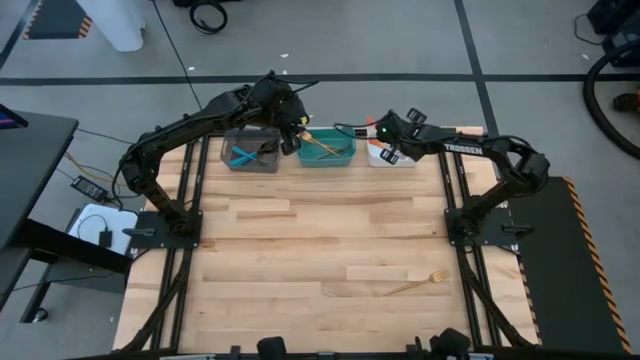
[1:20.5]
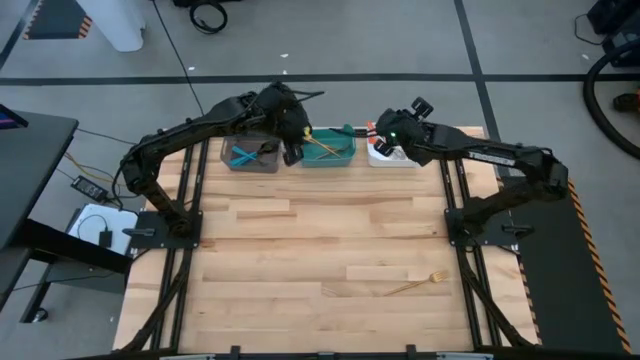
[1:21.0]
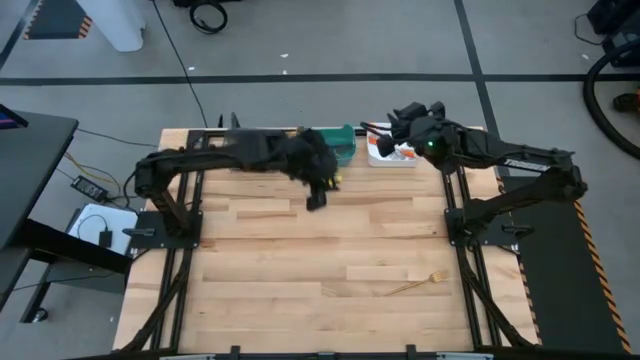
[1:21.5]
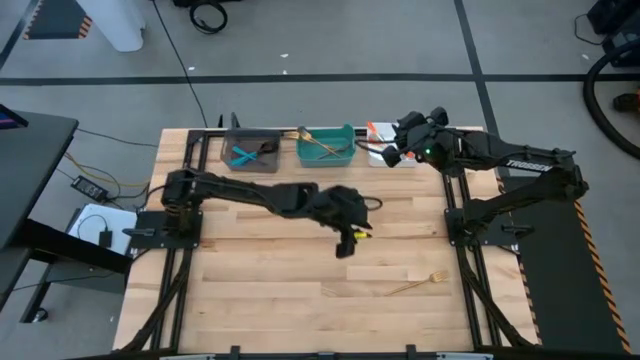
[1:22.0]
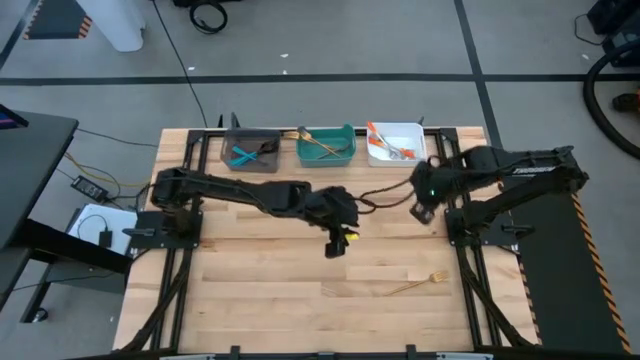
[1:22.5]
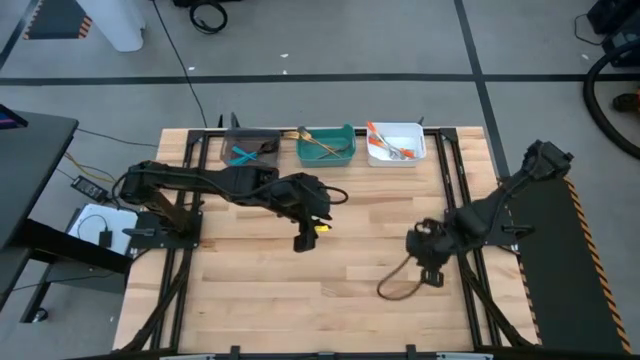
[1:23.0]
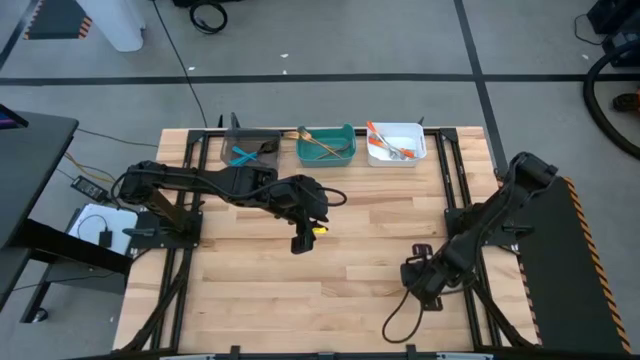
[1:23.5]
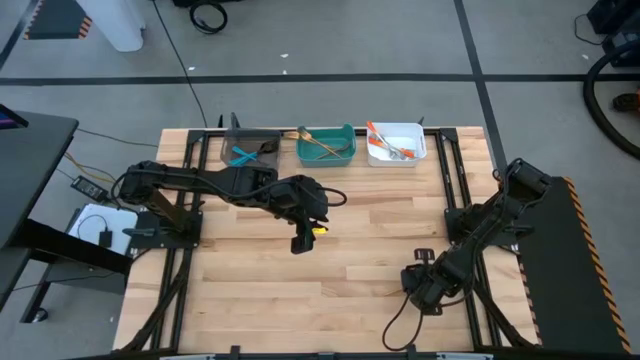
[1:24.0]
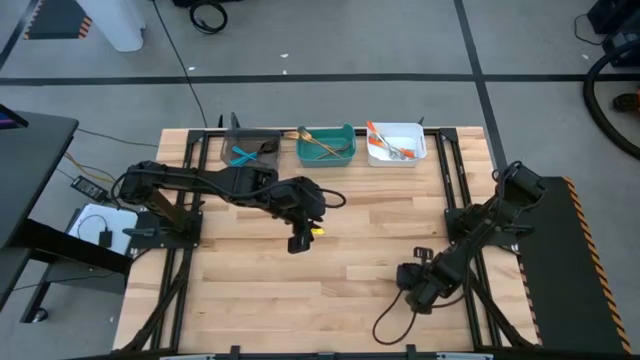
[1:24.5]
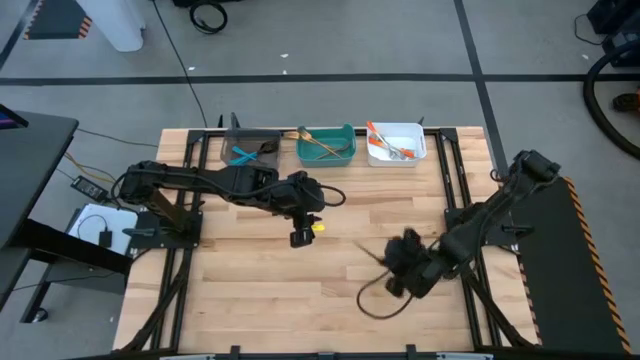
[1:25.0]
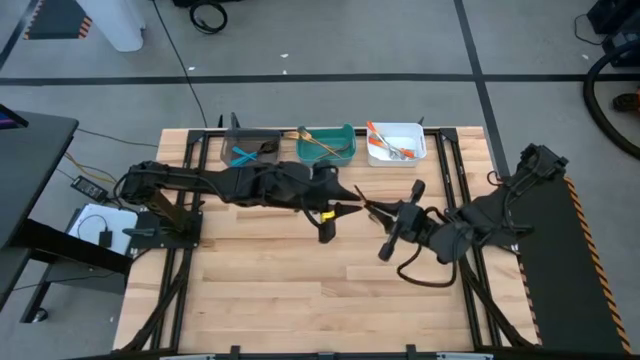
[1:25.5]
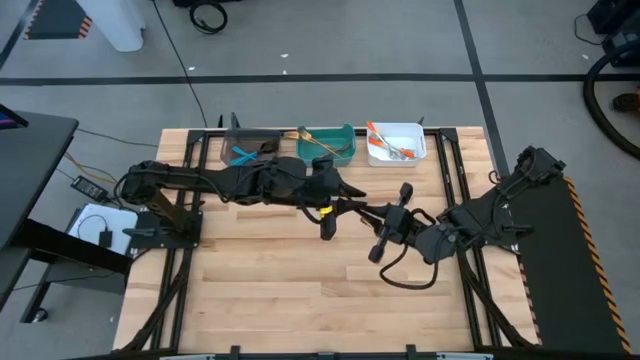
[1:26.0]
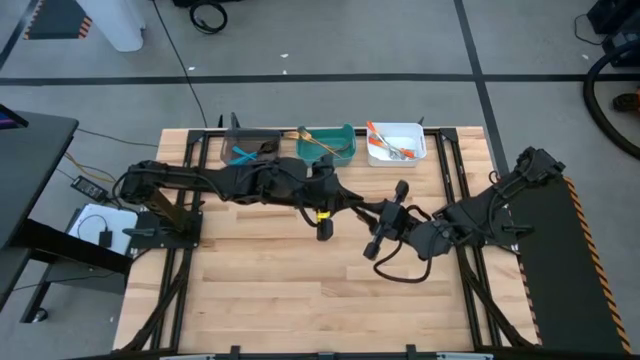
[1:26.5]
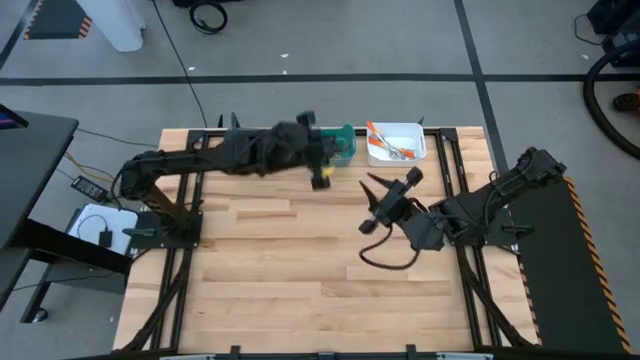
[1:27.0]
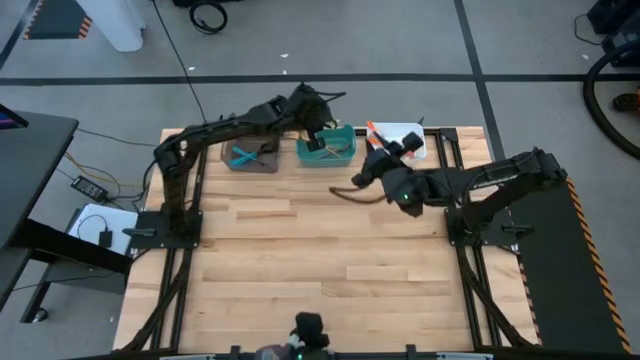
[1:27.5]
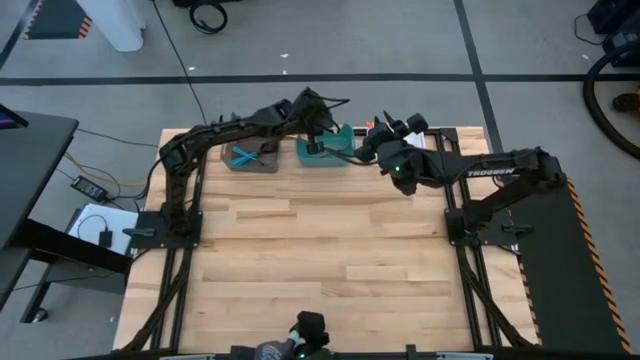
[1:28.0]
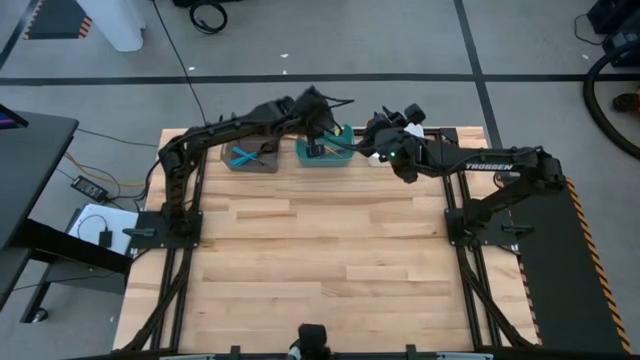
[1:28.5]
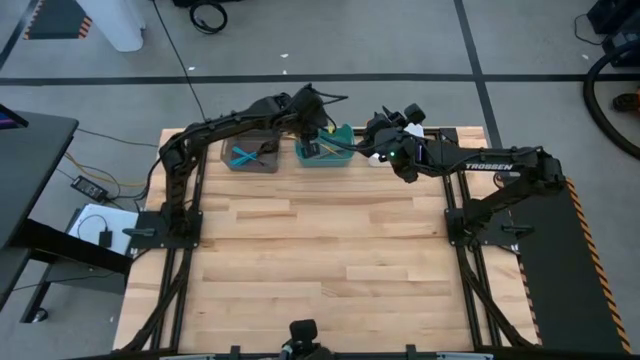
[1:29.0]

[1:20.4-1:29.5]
Task: Sort silverware by color (type)
Put the gold fork into the green bin

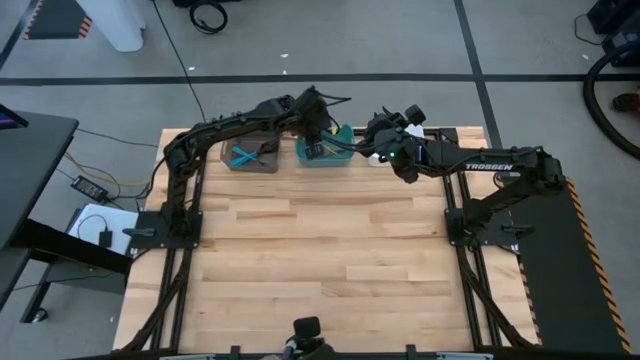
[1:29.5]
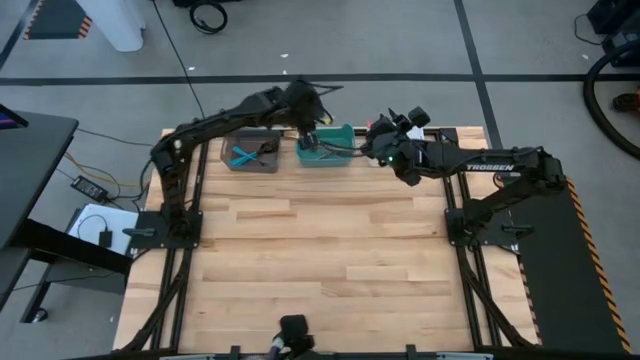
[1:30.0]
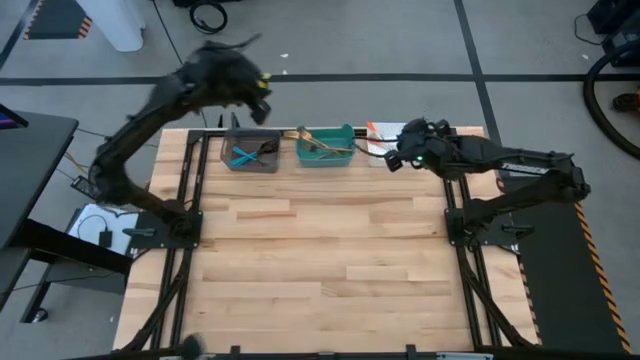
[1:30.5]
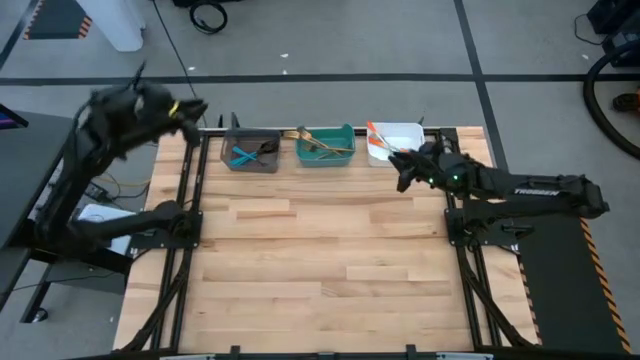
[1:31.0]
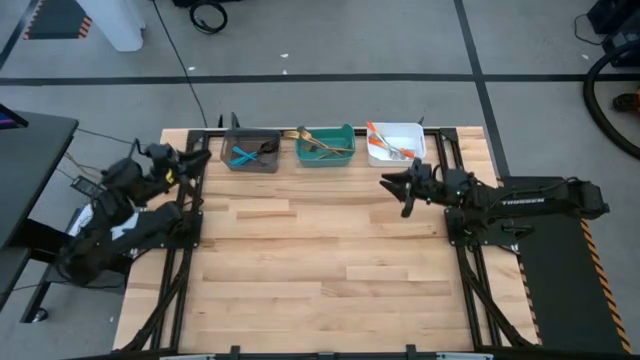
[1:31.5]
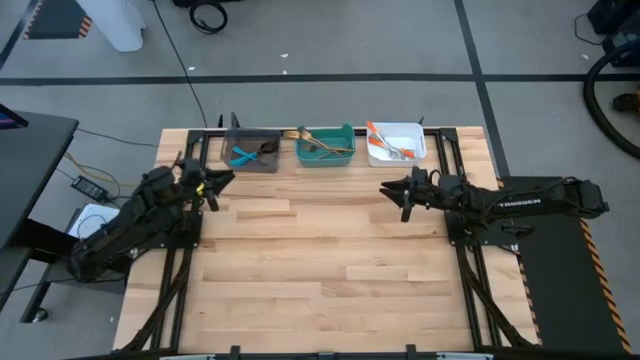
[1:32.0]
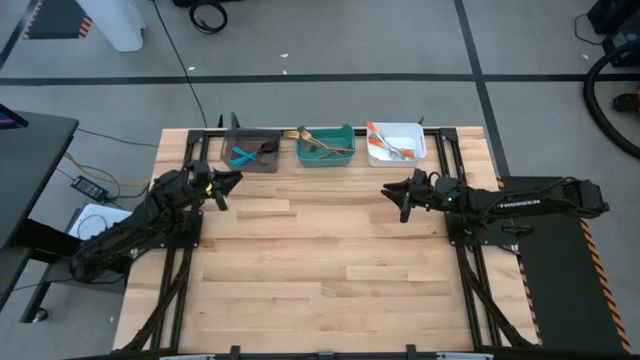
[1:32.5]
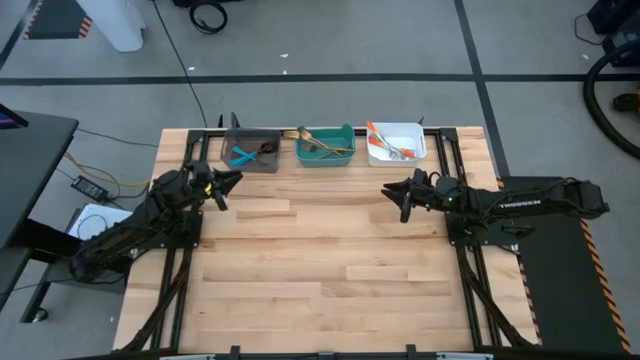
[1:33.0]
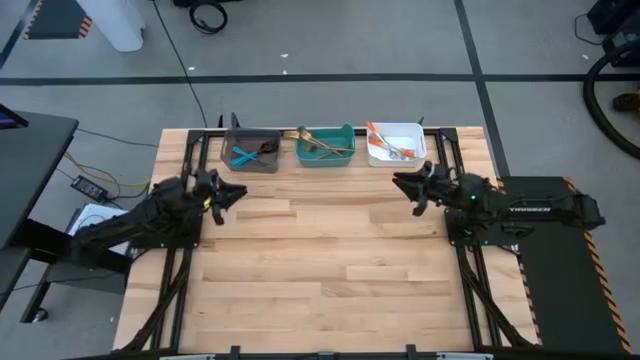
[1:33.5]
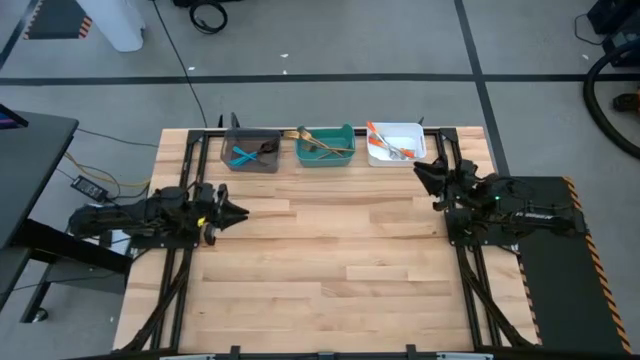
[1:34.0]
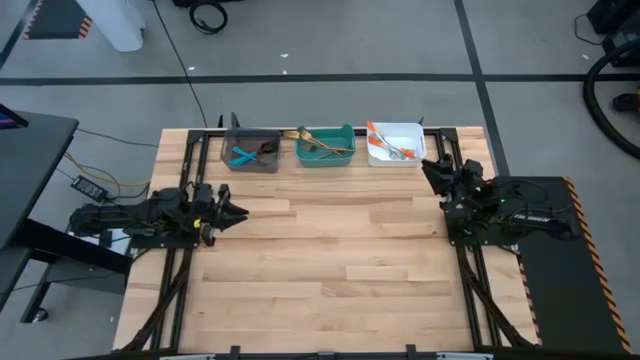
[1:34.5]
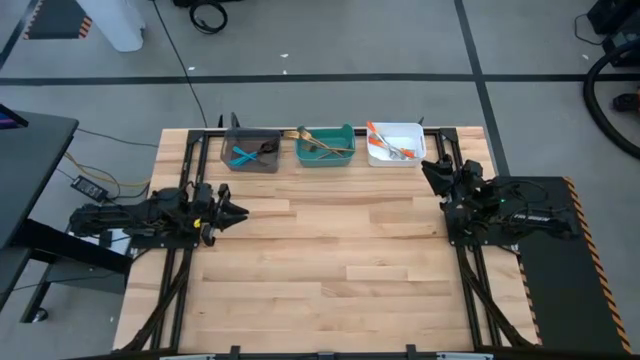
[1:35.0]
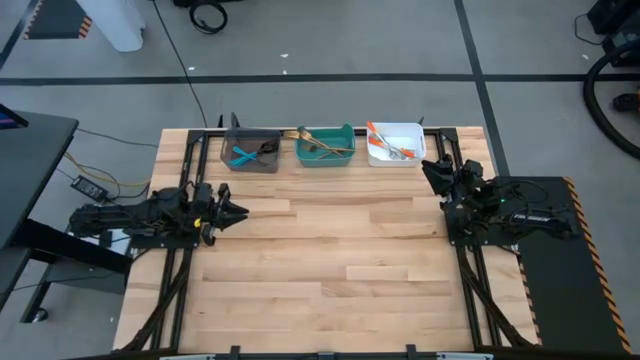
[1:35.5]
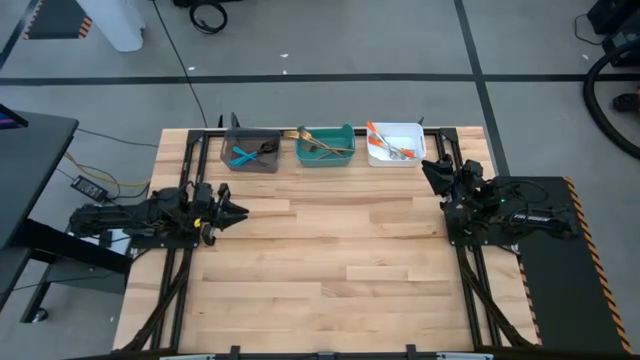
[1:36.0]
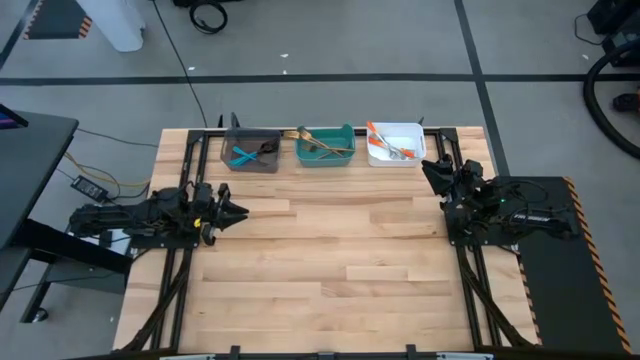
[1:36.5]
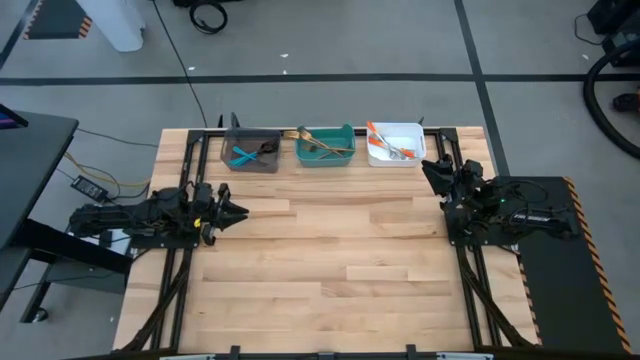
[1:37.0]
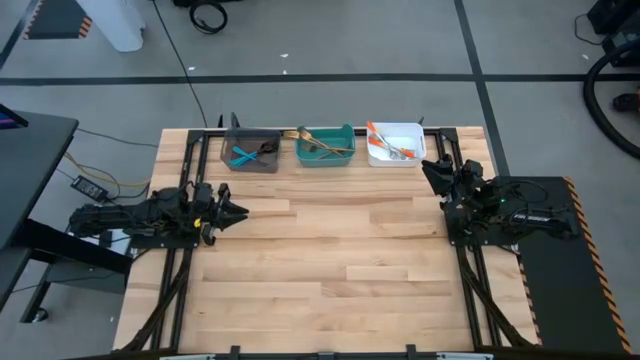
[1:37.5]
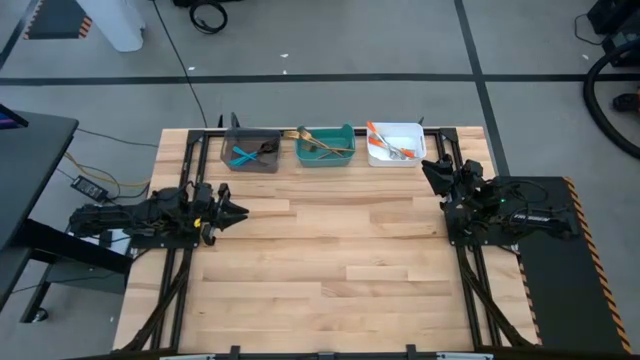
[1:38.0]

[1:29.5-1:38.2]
Return to Home Position
